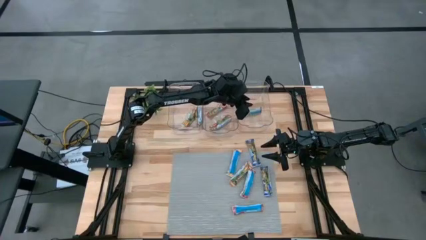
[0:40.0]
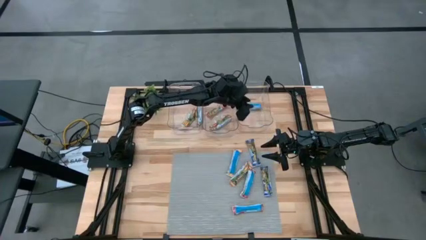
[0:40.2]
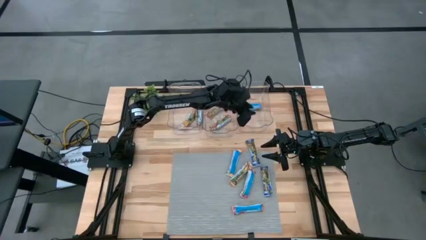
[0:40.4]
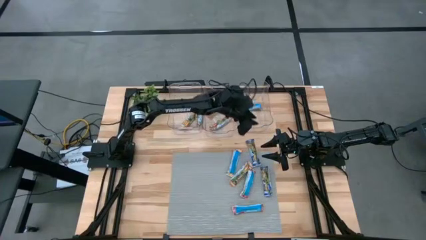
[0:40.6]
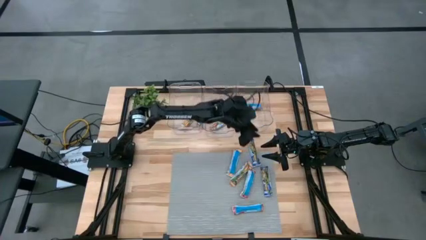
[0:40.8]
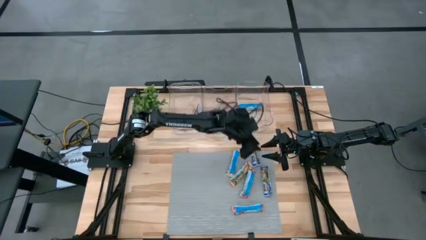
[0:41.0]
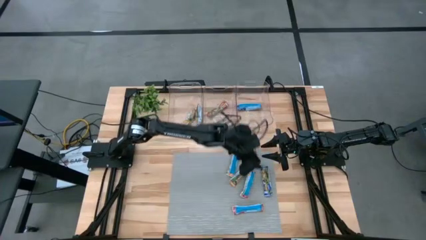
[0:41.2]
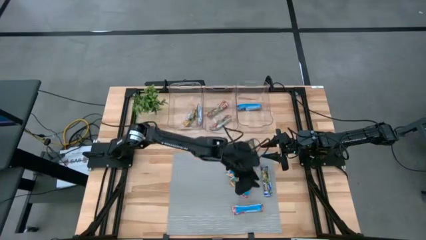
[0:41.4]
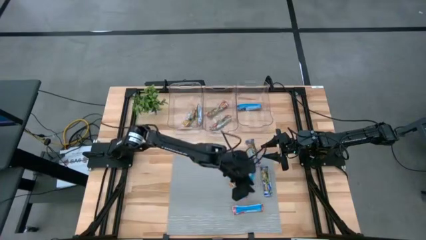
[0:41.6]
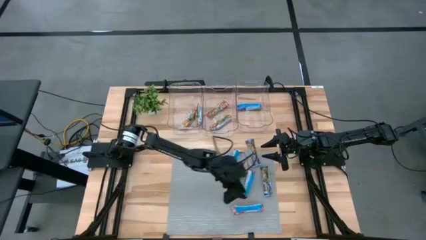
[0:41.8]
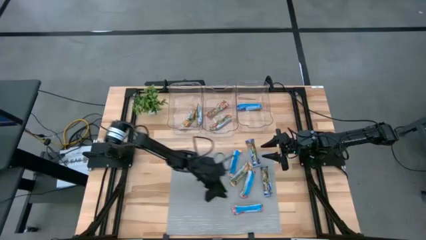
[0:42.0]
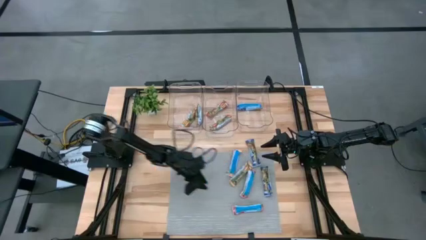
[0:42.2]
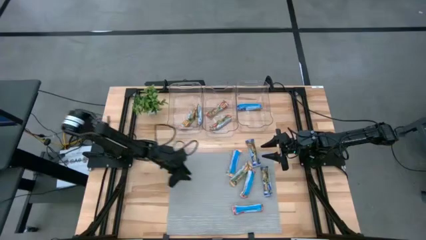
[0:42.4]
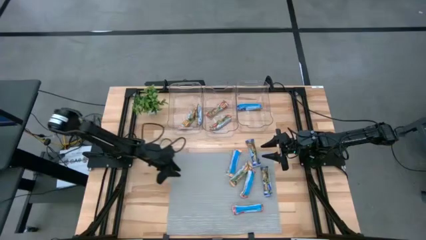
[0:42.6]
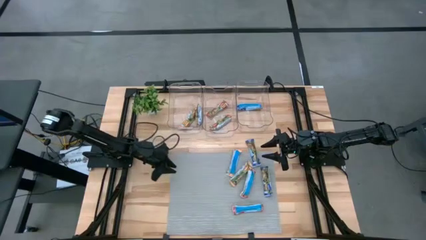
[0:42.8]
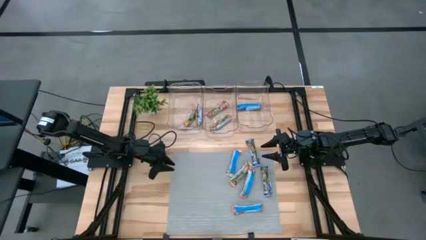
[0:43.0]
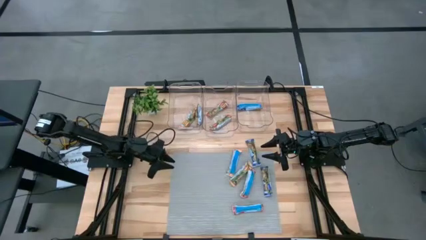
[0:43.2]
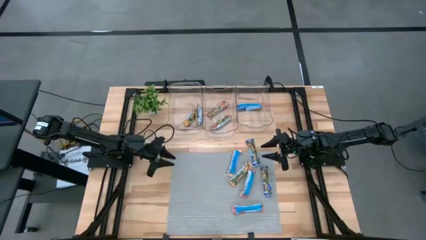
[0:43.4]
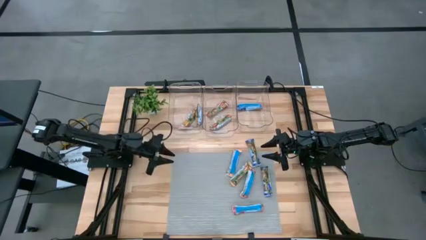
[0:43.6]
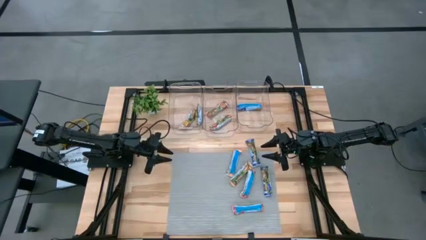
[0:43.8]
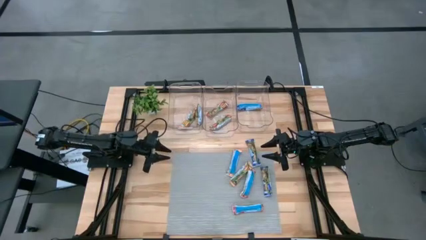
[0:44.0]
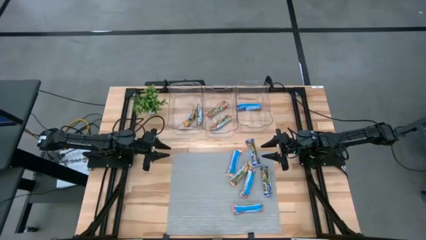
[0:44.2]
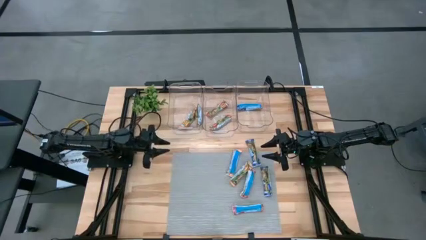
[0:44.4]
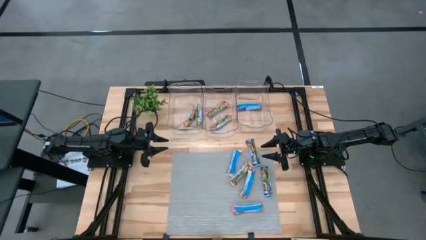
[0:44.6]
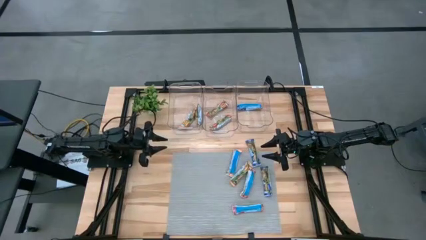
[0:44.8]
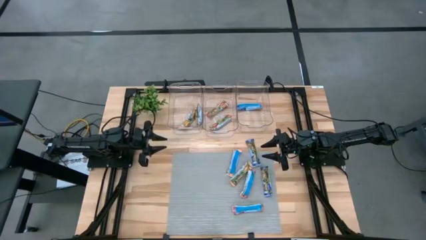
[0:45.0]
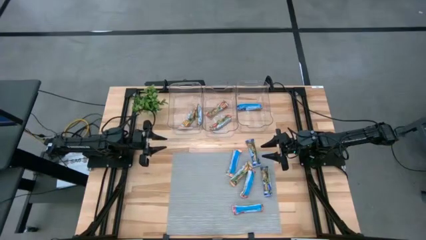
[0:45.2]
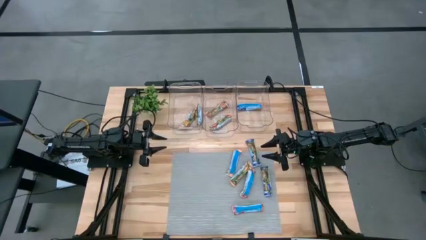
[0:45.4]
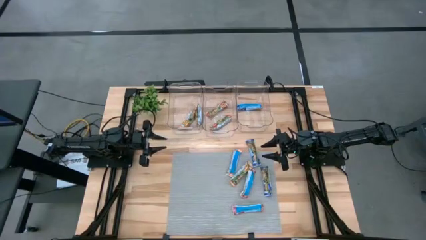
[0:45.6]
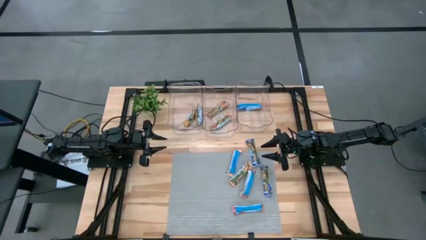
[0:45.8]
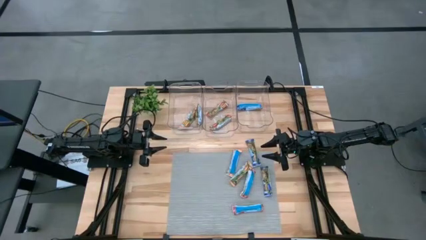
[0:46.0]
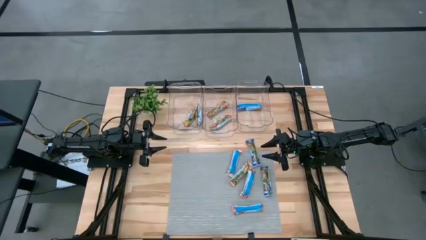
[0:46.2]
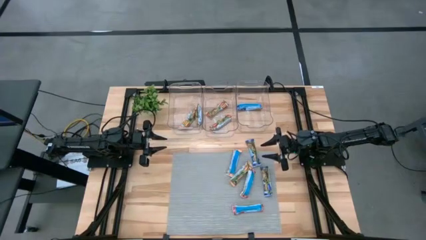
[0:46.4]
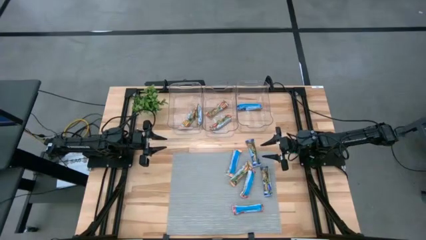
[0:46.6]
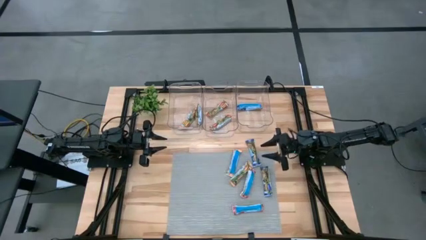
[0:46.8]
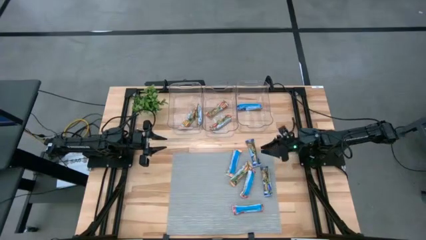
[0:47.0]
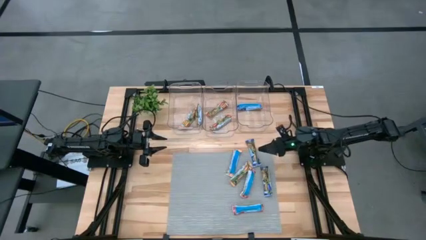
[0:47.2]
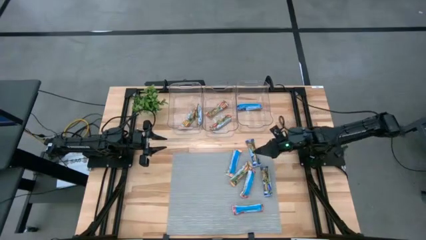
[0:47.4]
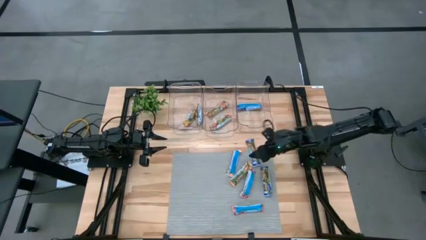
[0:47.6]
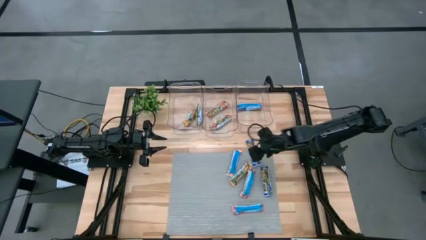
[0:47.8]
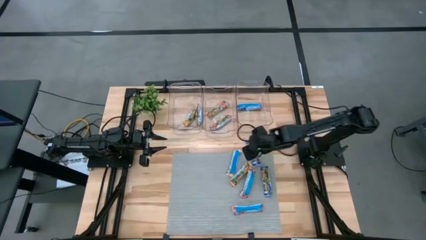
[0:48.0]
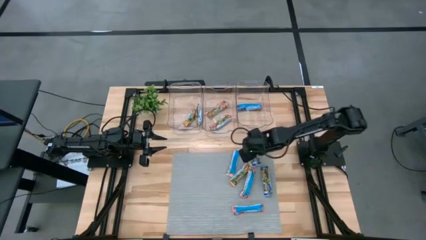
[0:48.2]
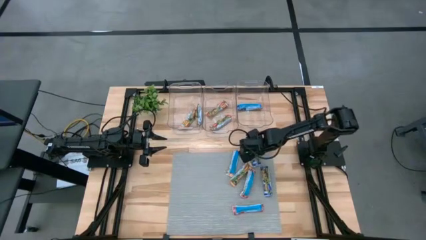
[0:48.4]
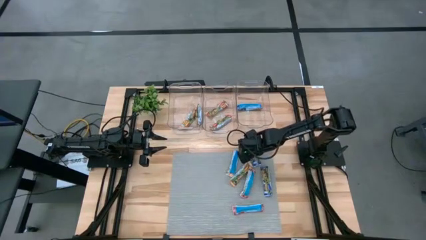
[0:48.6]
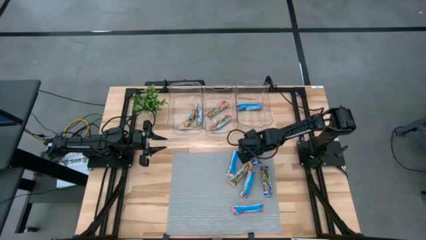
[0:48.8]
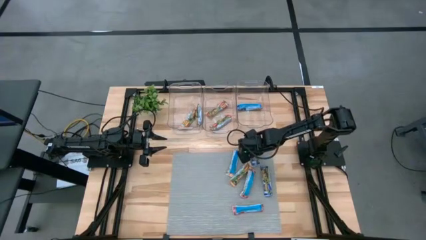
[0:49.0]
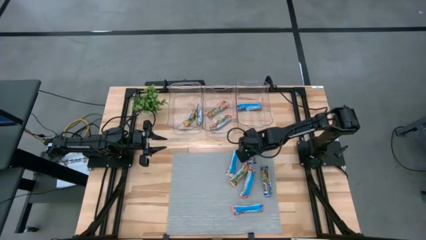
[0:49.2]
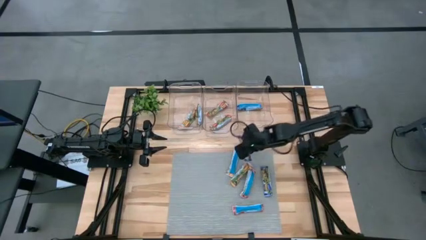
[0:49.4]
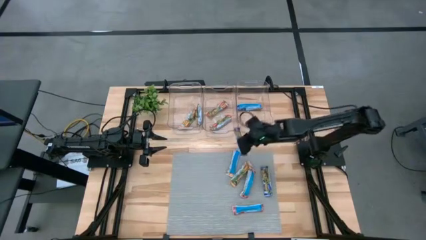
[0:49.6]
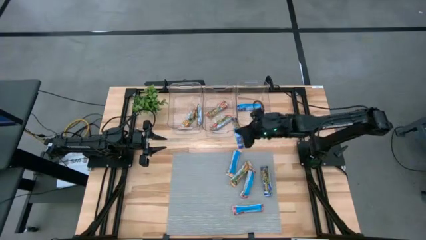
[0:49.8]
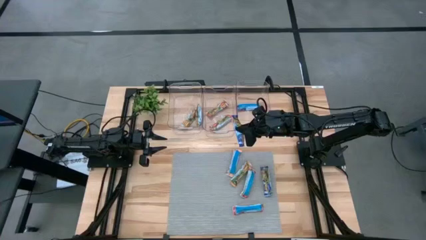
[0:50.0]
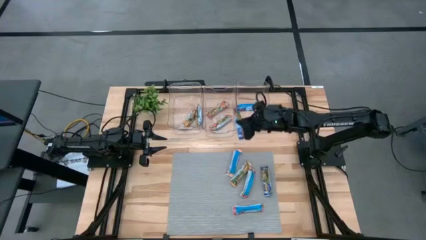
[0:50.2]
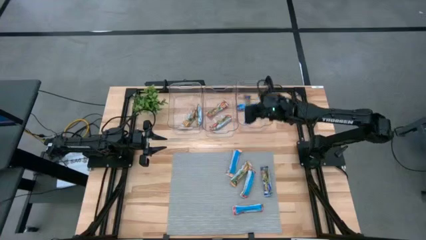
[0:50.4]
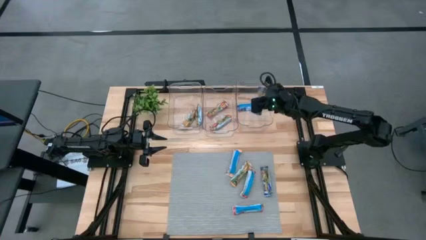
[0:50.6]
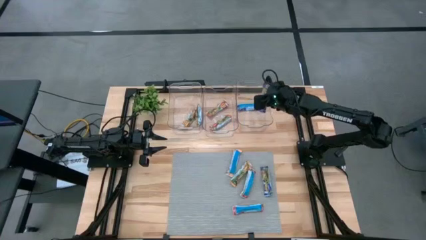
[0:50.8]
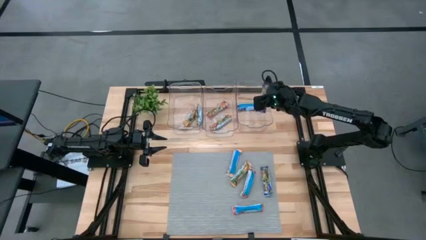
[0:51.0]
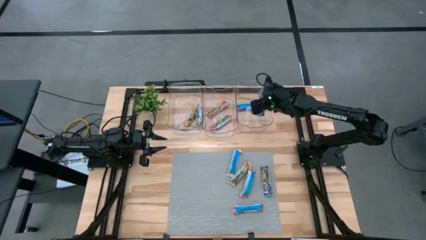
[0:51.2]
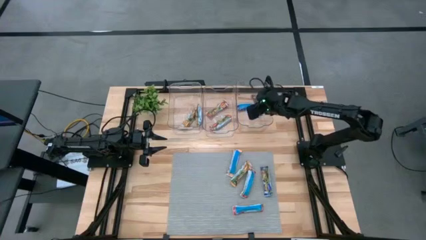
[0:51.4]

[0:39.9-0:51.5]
Task: Pick and place Granola Bars by type
Put the blue granola bar into the right transparent bin

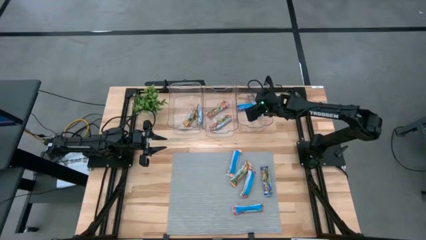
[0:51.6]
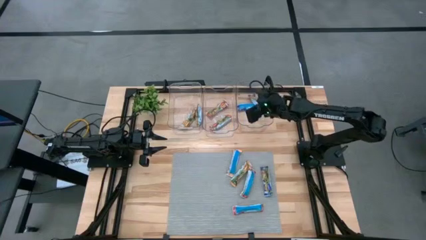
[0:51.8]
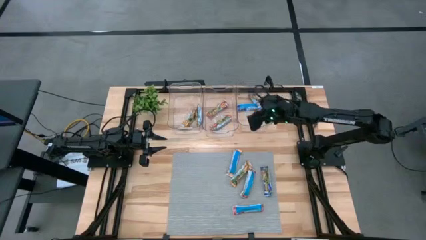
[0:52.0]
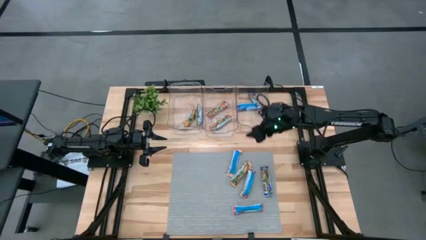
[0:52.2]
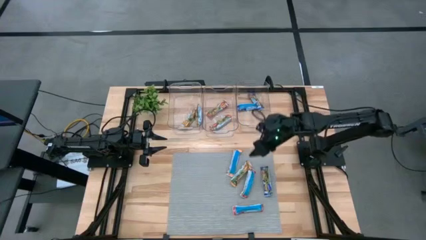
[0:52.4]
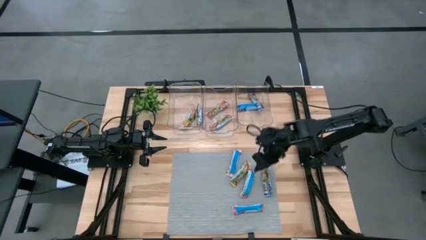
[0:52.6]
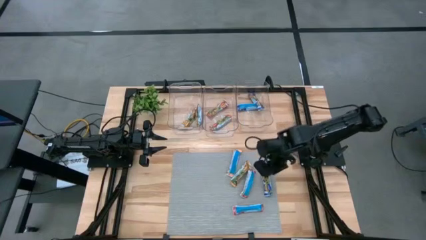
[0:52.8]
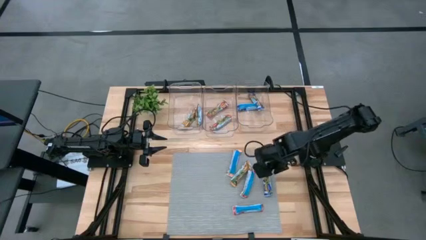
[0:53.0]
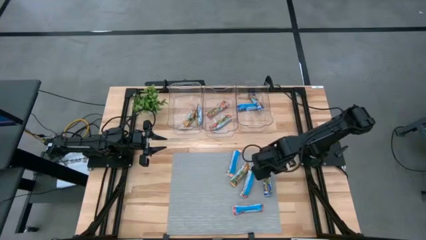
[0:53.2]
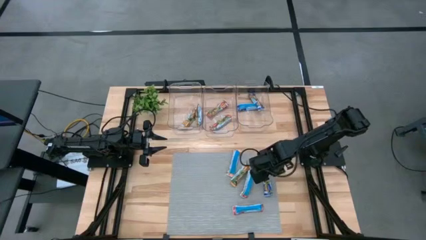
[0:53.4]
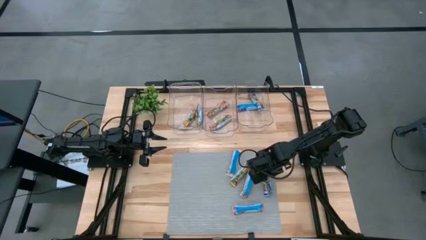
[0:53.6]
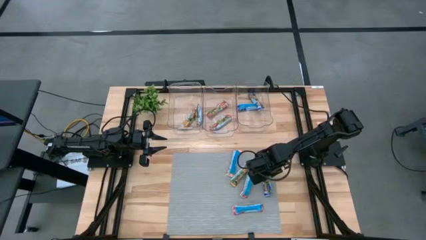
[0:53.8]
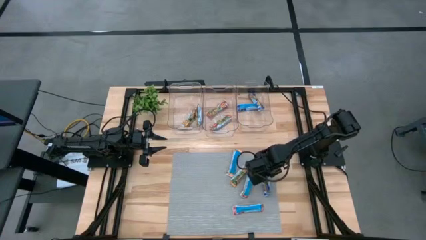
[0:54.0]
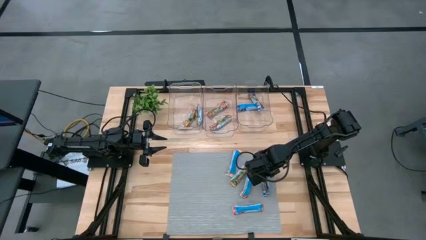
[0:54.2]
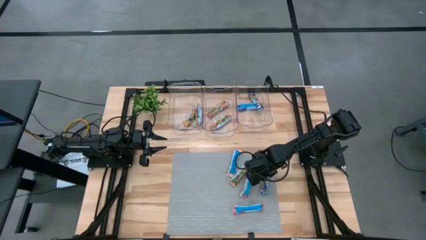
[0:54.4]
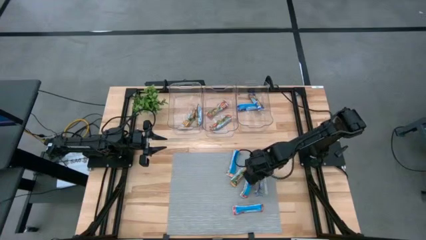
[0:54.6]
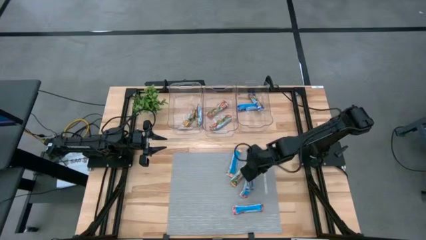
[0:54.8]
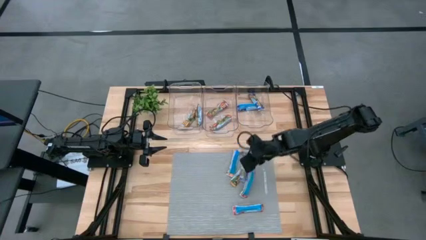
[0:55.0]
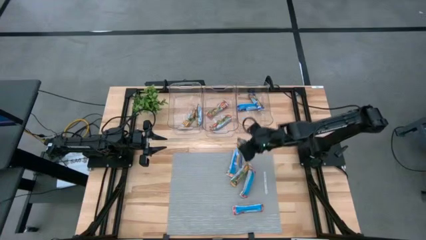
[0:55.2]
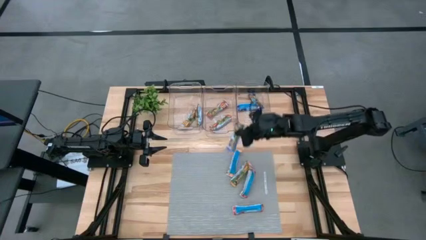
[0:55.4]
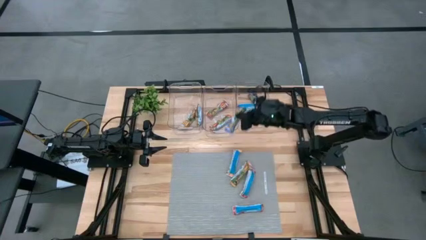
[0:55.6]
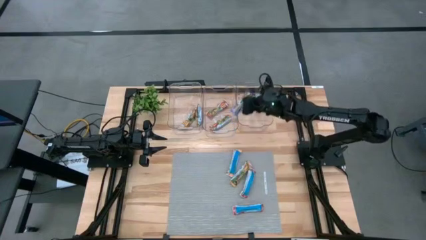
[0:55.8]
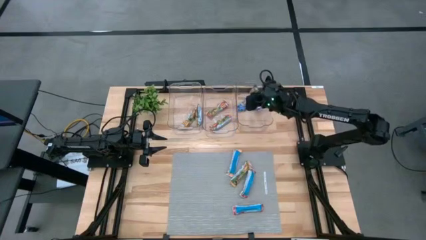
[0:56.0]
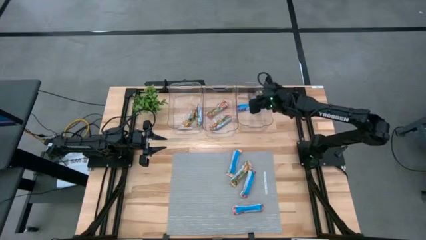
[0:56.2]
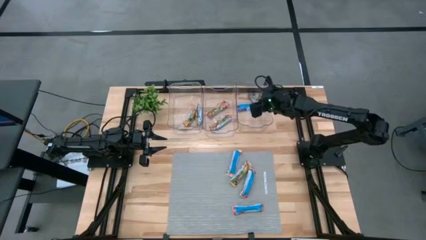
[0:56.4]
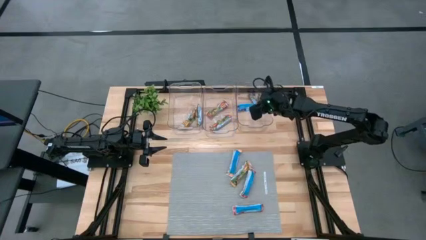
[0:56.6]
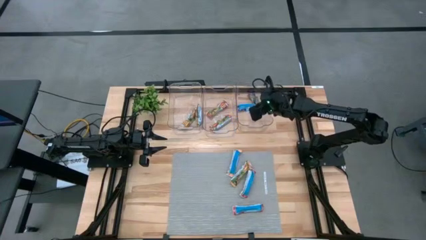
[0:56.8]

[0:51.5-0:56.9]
Put the blue granola bar into the right transparent bin
